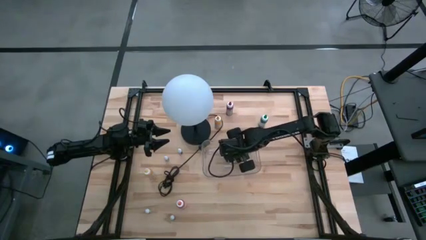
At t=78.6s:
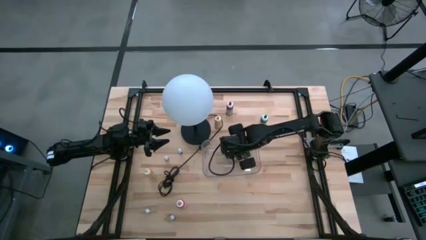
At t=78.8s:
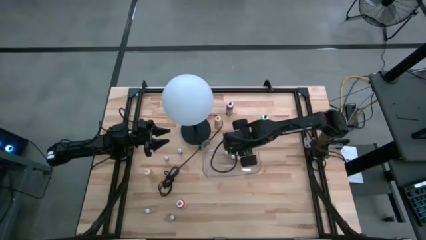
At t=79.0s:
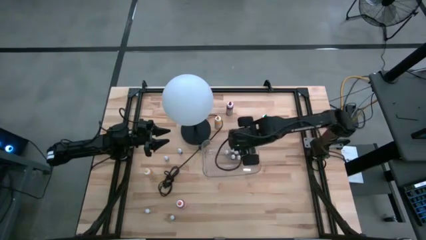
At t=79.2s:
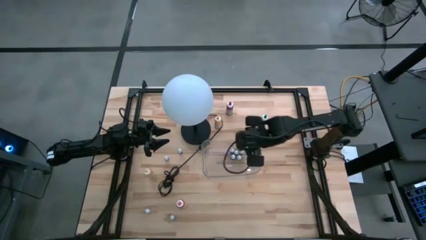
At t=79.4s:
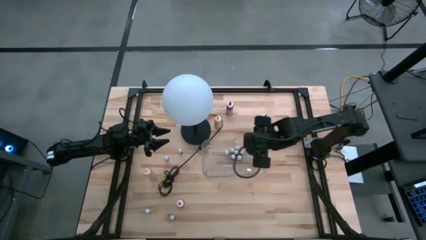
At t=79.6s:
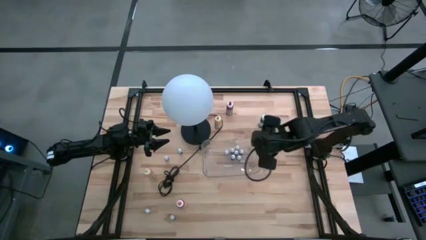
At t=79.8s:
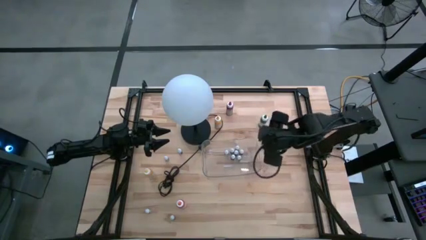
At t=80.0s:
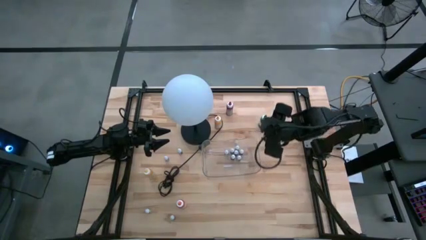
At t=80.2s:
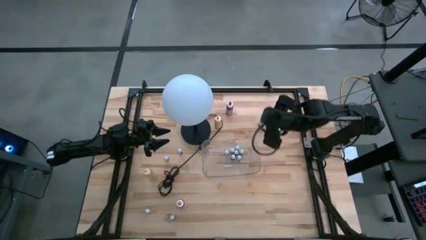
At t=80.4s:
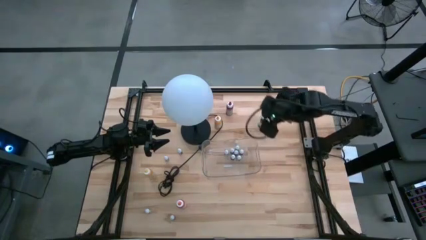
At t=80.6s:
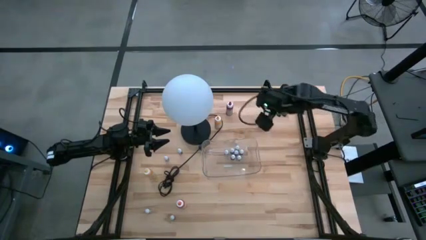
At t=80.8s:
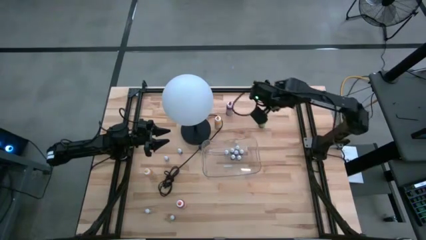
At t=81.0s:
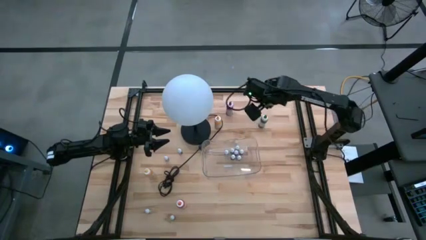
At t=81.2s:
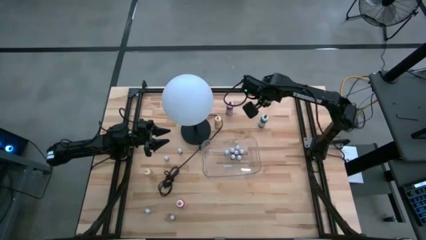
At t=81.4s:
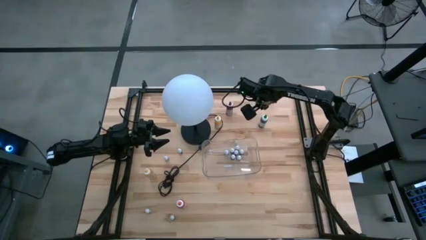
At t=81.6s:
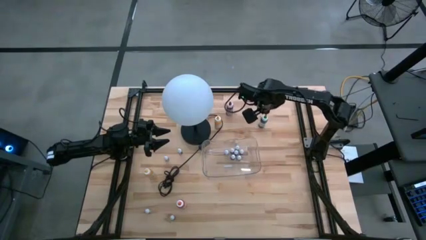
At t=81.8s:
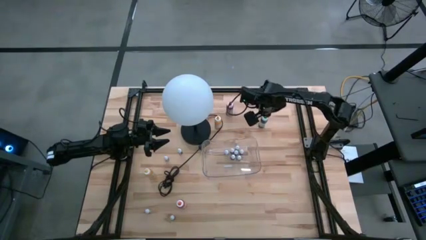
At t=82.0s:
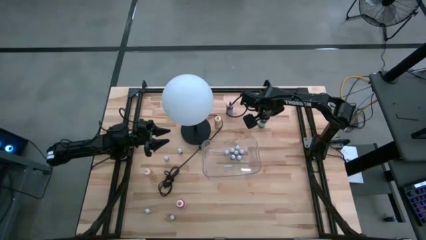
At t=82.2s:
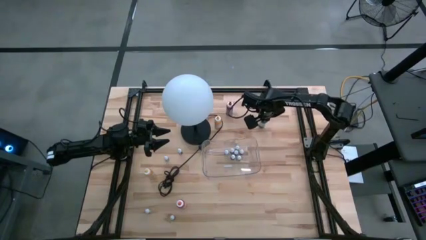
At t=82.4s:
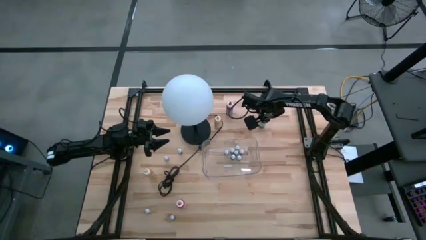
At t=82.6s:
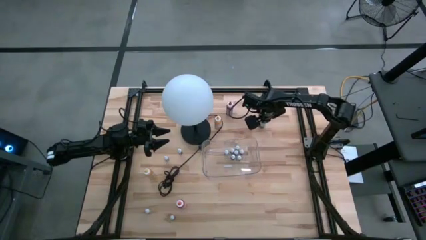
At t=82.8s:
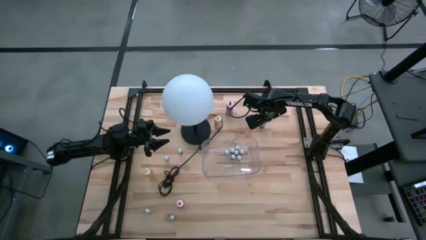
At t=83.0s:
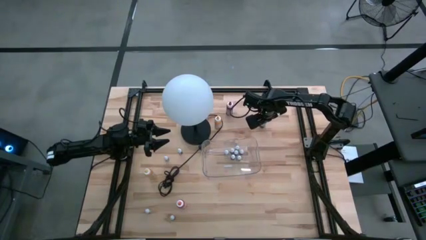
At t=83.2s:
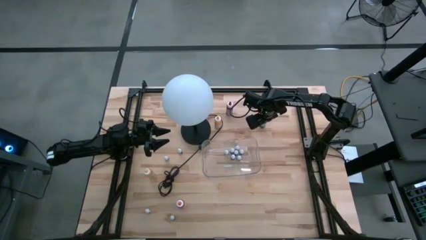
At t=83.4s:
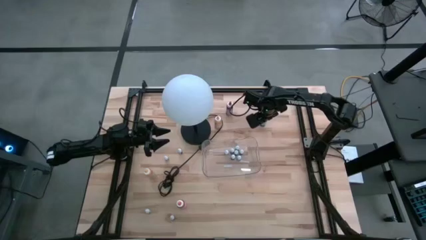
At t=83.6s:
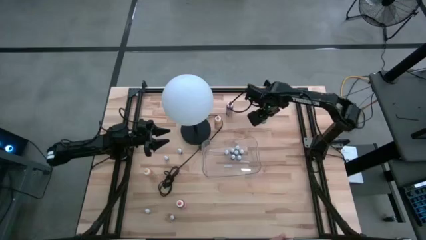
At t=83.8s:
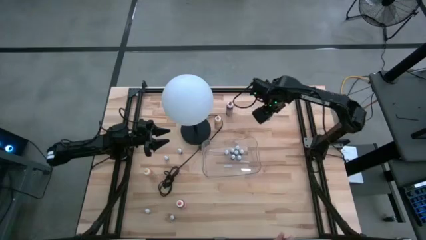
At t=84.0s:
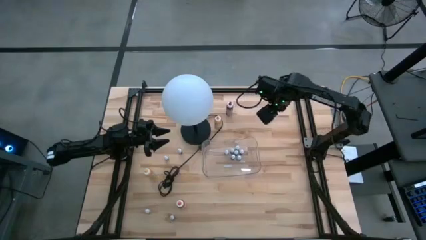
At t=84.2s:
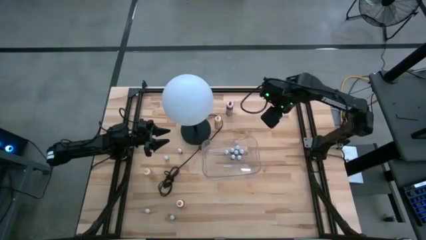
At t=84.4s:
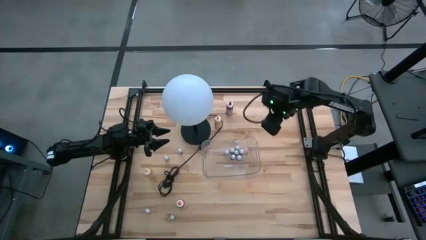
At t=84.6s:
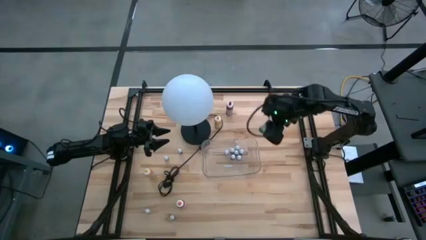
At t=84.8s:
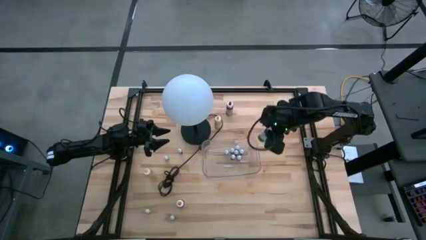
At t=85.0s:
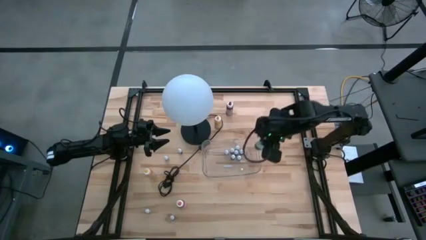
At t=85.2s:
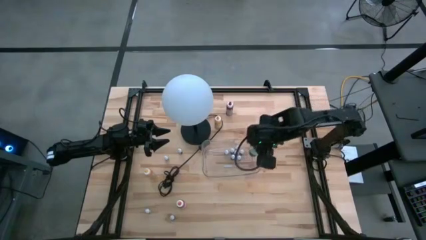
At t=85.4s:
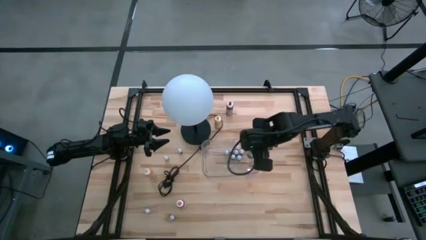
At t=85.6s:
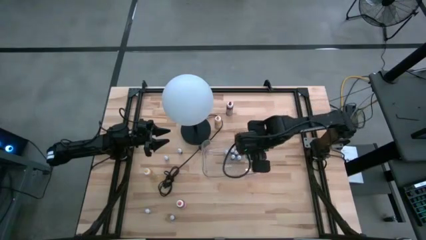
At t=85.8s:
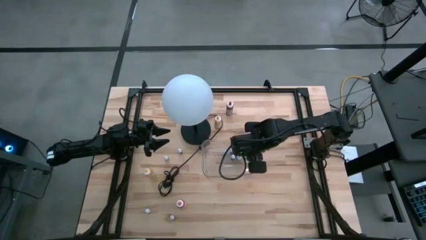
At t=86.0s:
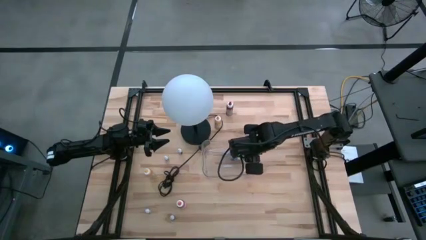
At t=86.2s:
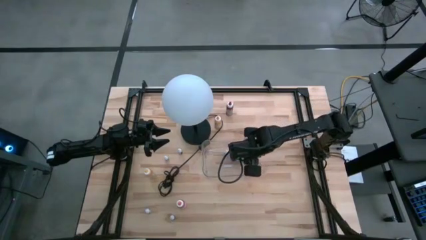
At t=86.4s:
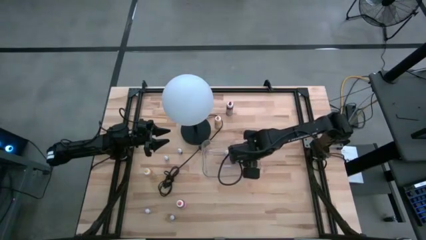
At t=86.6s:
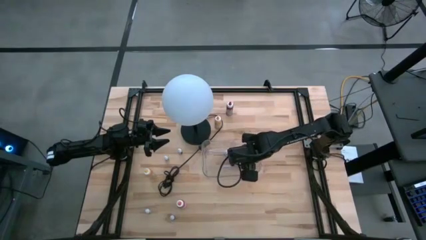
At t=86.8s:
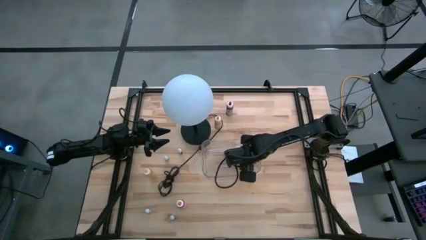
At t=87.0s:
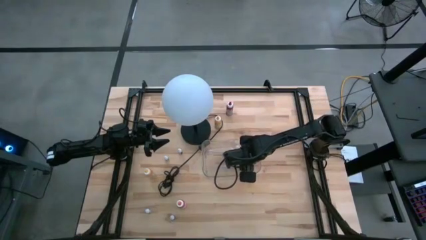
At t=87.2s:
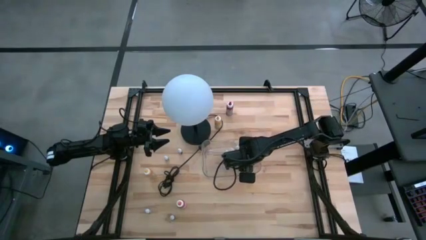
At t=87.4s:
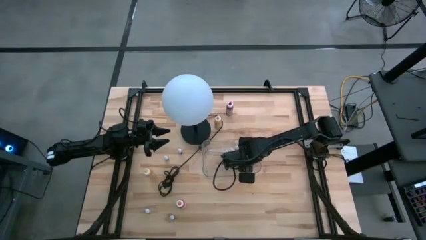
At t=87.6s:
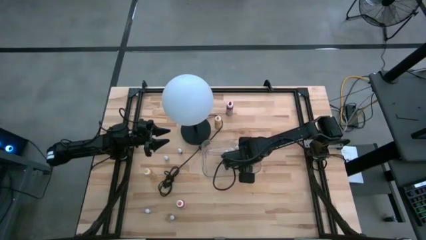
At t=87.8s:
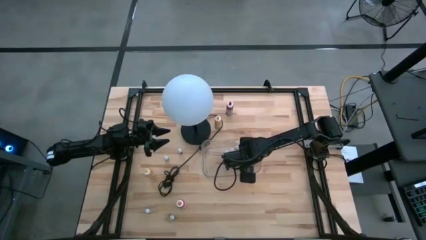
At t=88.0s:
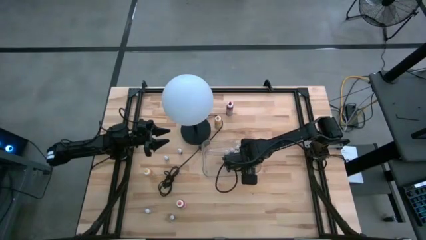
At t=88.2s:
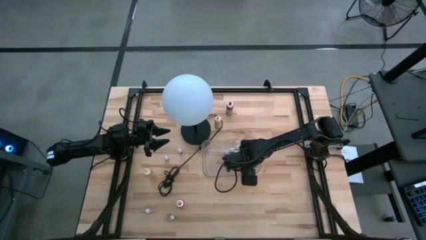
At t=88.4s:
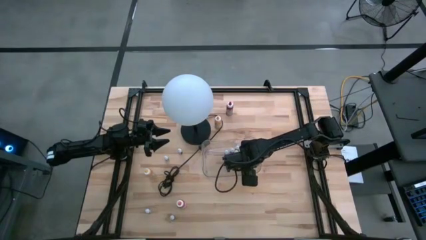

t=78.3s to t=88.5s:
Task: Pick & Place food coloring
Put the large green food coloring bottle into the transparent bin
